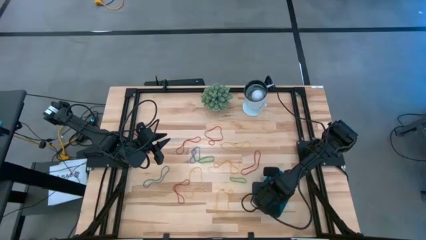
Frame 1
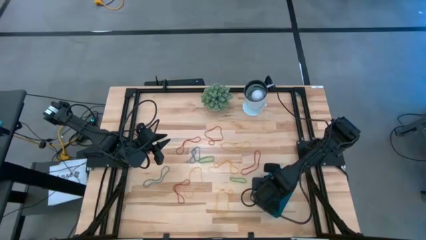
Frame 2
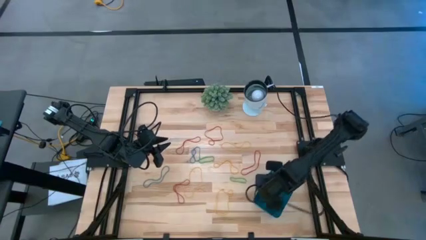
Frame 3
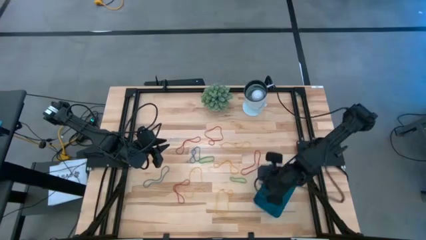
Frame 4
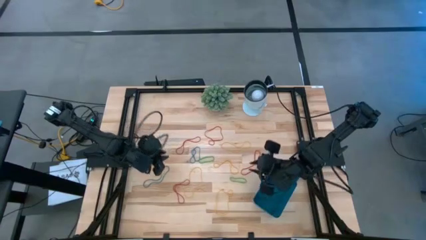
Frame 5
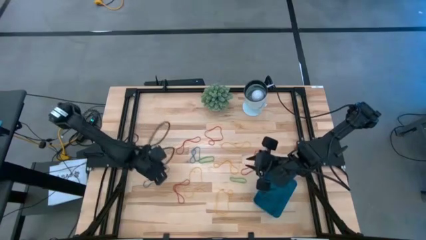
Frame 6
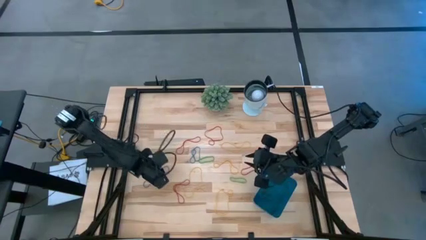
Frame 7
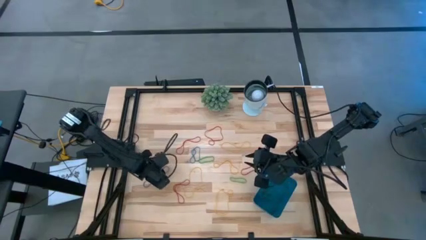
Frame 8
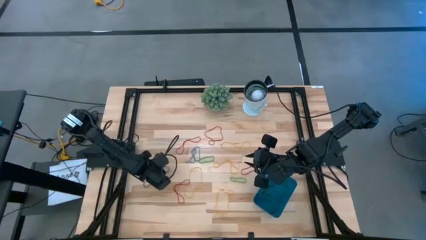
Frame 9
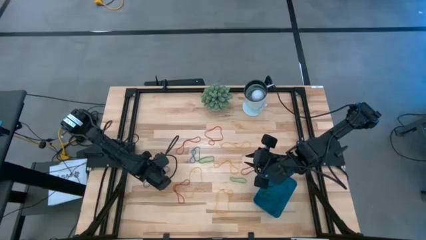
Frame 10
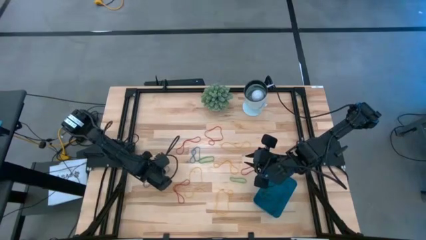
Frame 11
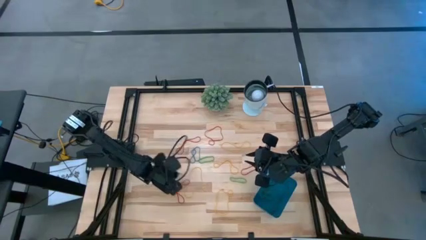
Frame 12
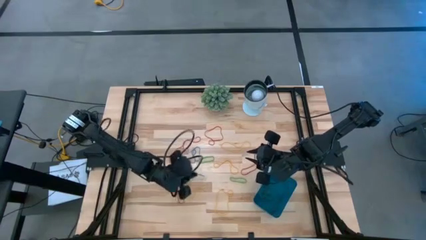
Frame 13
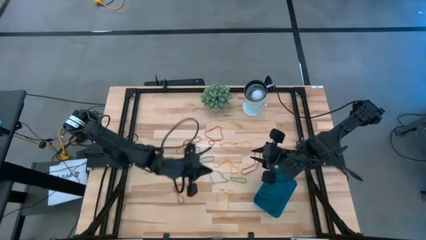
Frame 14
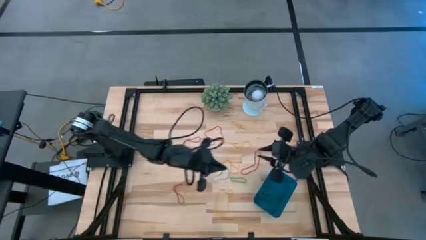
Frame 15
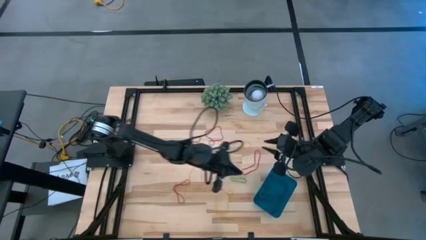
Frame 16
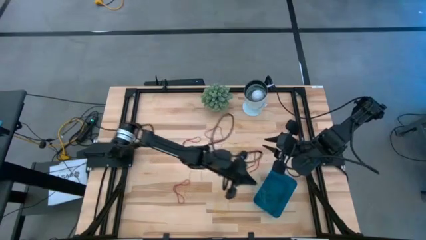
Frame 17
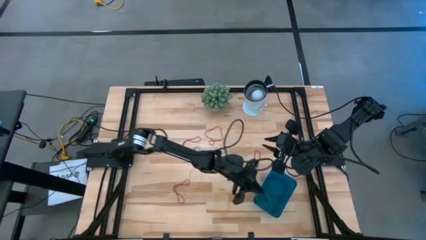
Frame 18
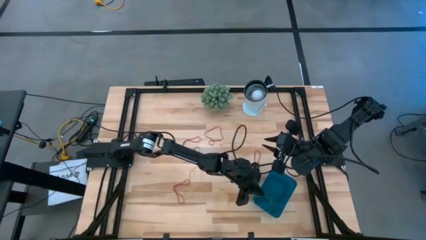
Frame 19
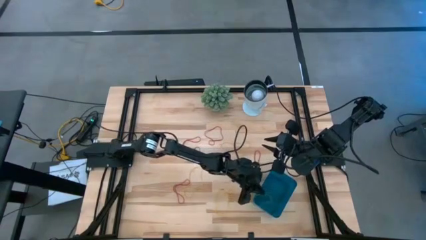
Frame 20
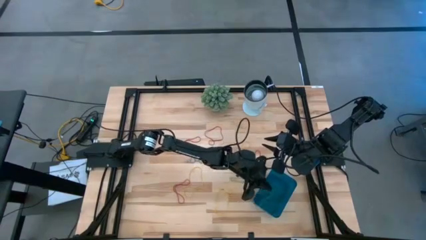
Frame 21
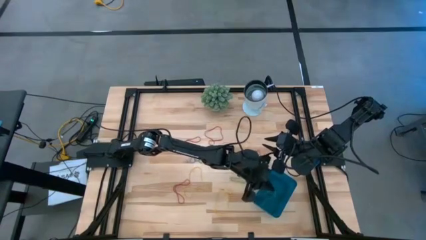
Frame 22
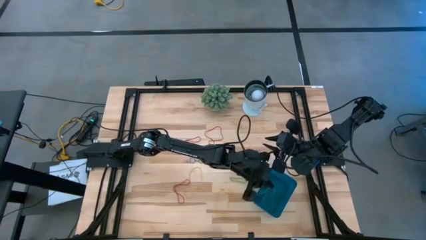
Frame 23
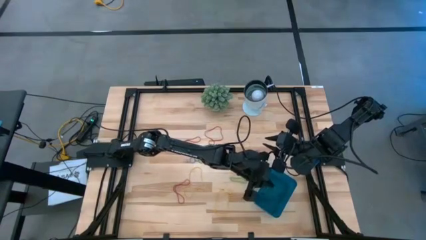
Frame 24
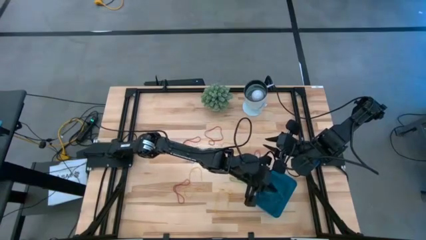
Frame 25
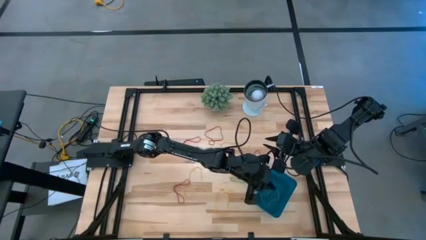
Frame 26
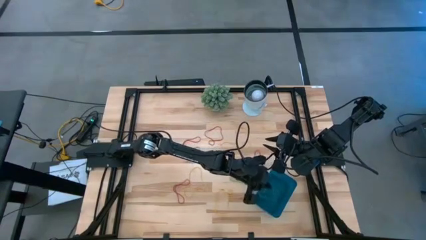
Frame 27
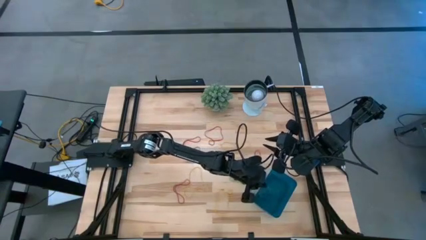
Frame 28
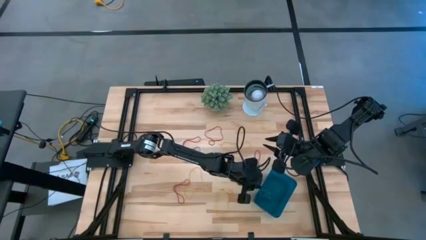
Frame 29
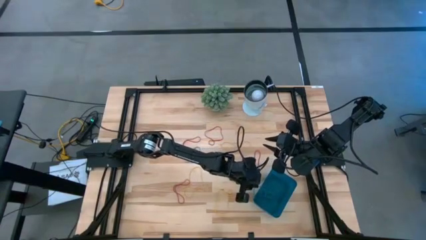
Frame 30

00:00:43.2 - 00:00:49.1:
Task: Pick and place items into bin
Put the blue rubber band into the blue bin

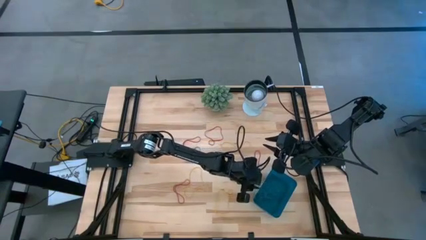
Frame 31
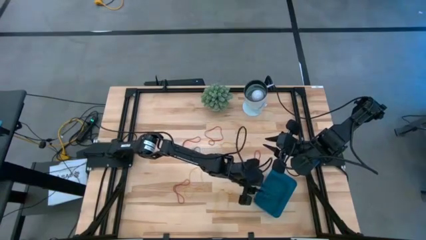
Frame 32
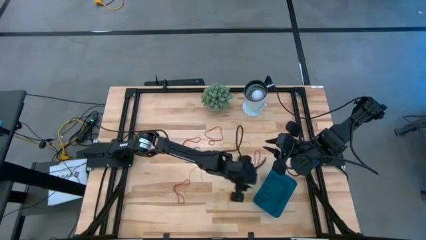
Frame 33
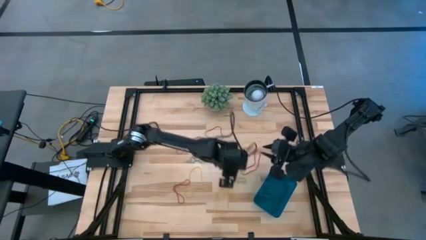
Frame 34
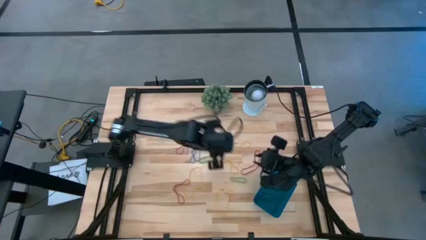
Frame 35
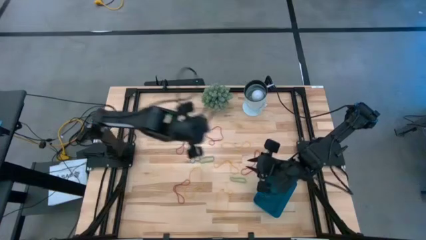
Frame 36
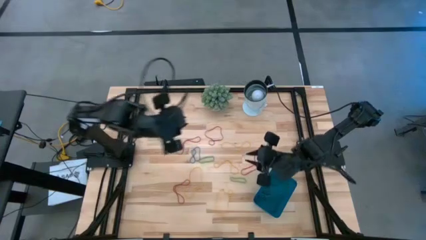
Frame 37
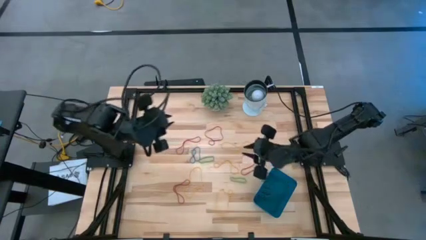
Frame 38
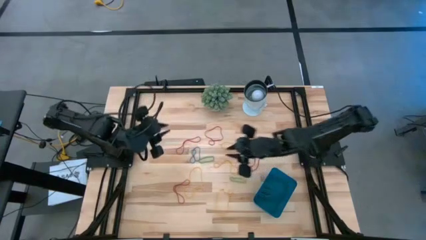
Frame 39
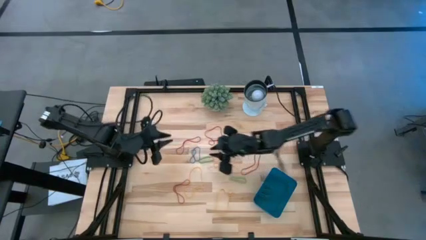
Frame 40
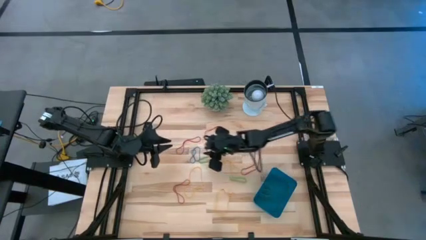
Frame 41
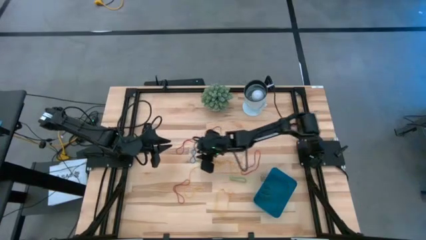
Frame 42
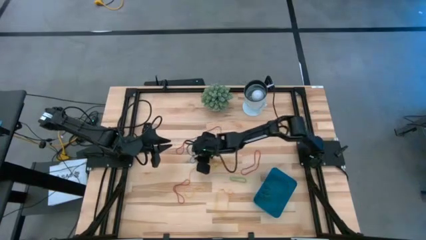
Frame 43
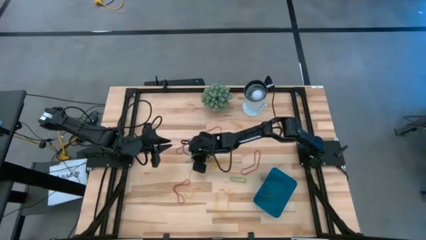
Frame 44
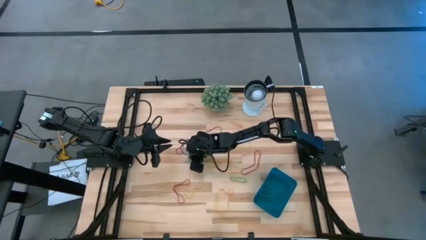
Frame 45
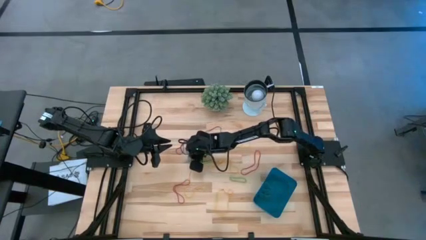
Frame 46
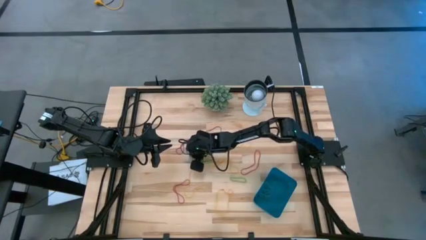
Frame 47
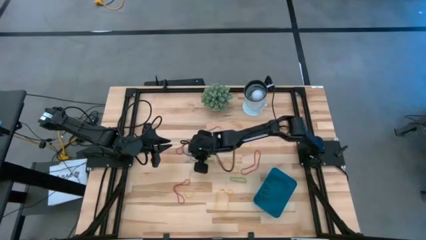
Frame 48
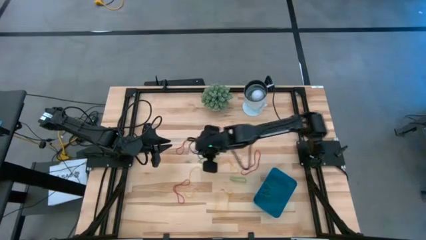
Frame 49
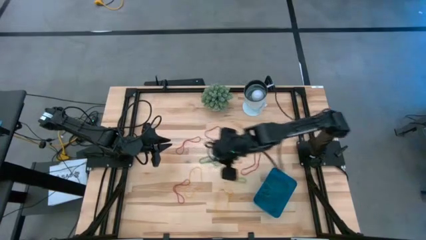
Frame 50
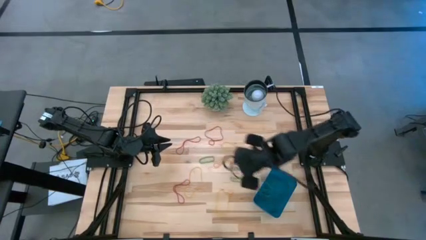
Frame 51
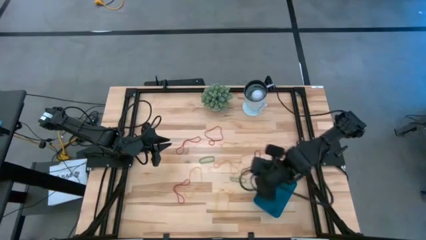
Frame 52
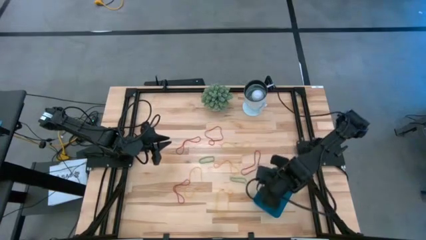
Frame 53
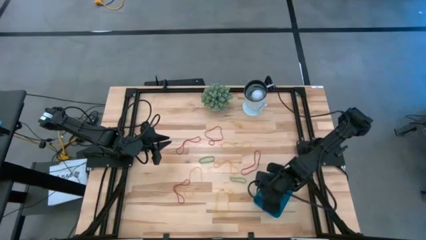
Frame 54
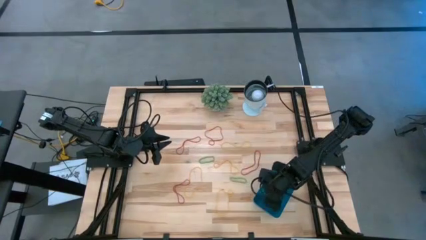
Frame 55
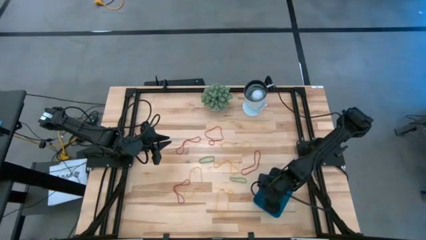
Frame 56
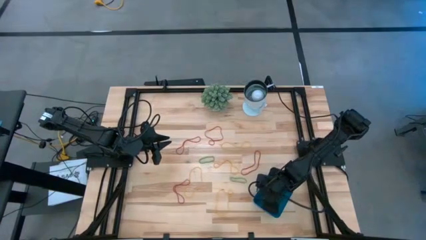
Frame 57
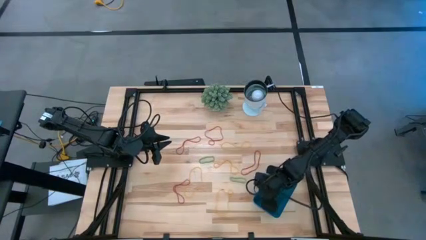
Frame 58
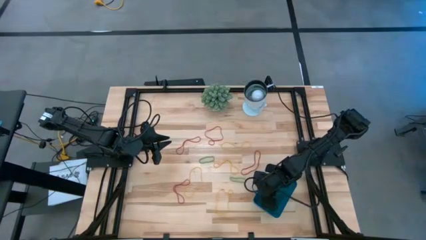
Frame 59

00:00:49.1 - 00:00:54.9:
Put the blue rubber band into the blue bin

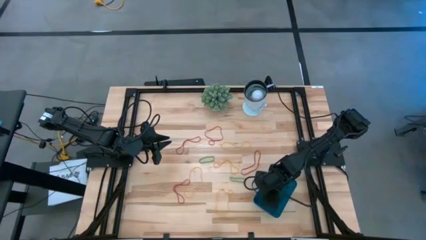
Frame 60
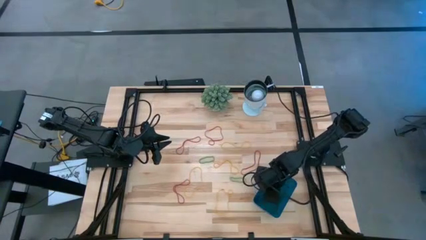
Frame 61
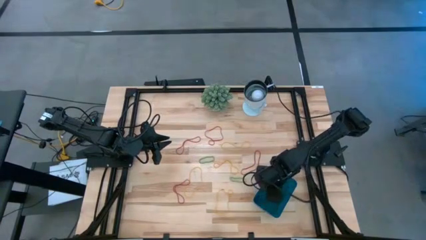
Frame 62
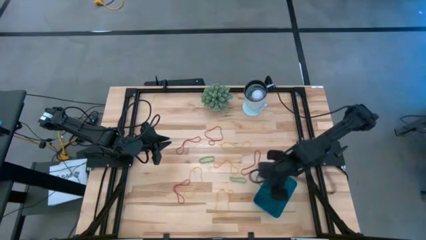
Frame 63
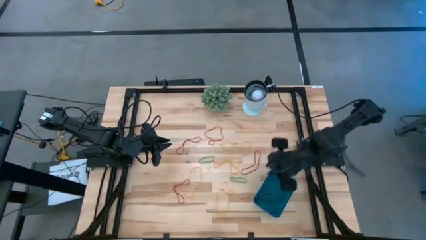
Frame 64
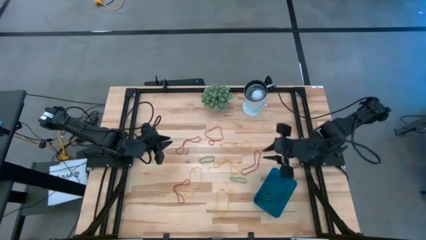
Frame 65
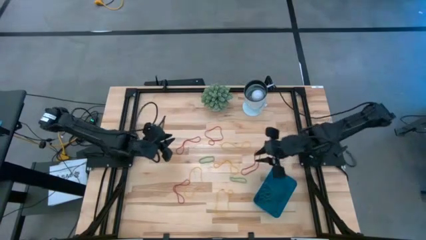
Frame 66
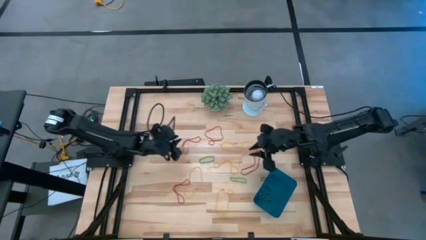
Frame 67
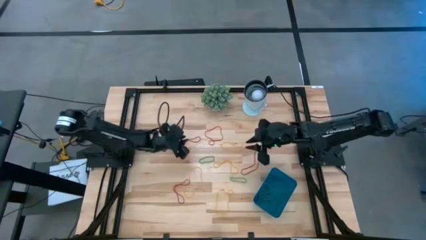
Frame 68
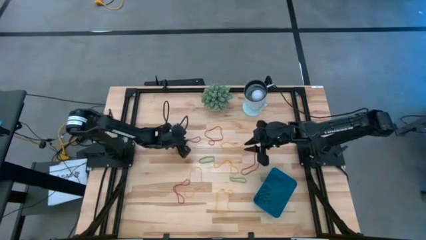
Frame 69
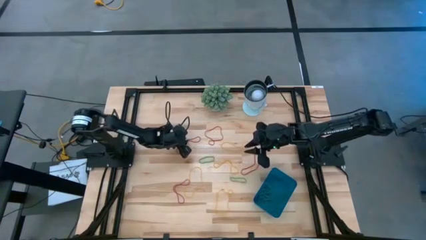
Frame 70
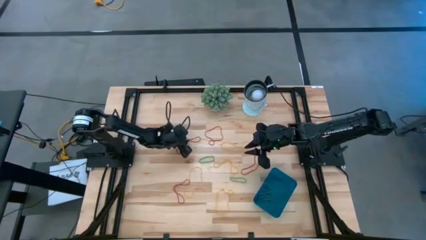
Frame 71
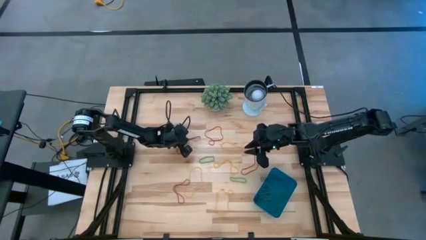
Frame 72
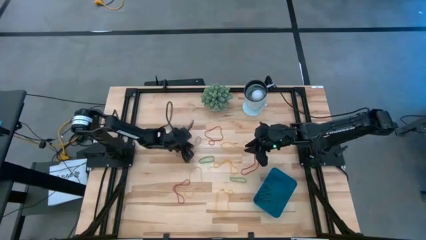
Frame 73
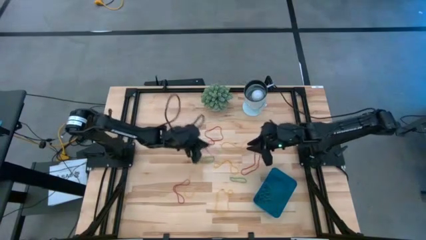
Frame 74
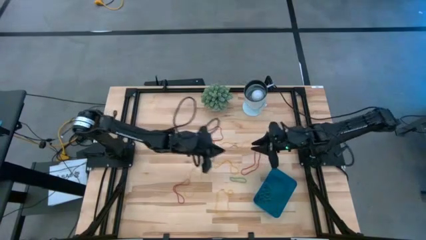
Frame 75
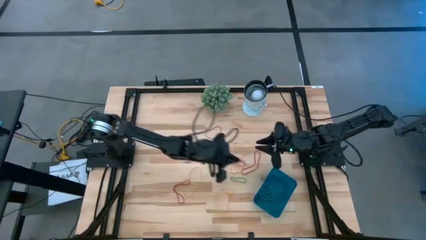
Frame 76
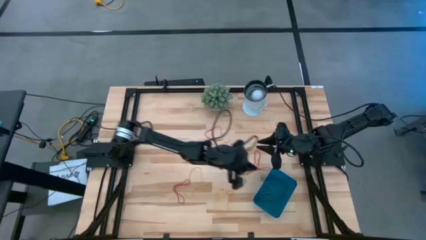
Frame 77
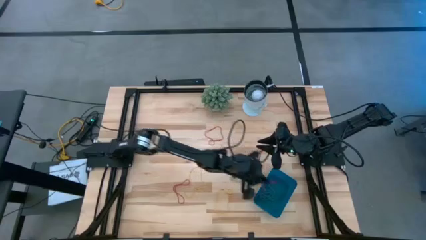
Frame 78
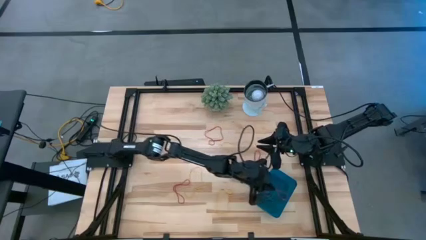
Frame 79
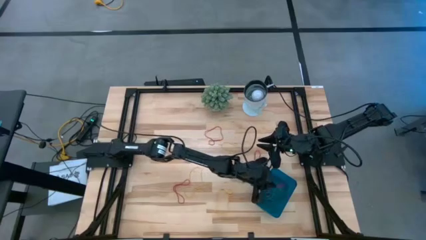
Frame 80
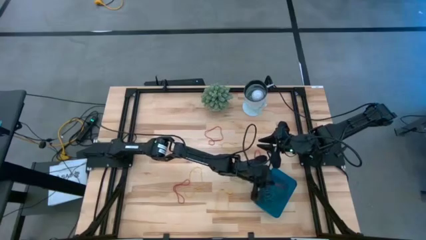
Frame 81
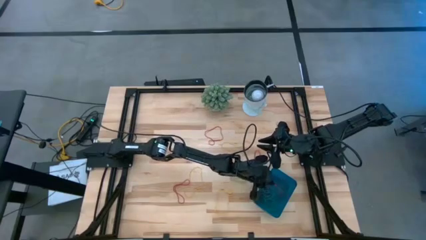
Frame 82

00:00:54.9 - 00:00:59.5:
Put the red rubber band into the blue bin
